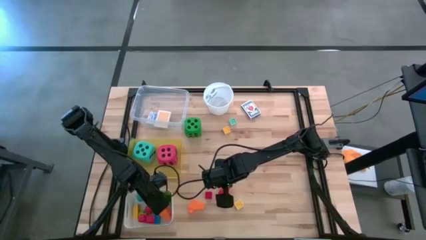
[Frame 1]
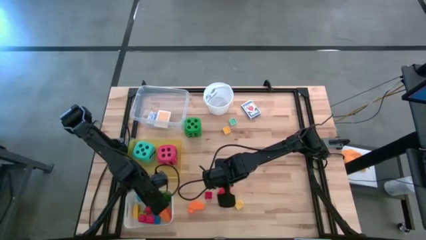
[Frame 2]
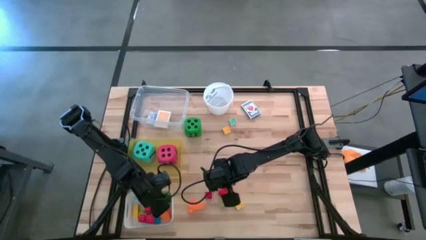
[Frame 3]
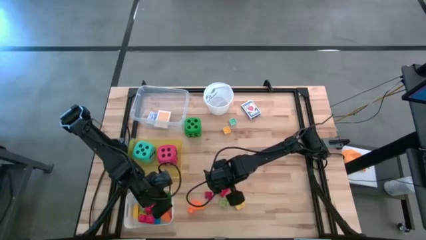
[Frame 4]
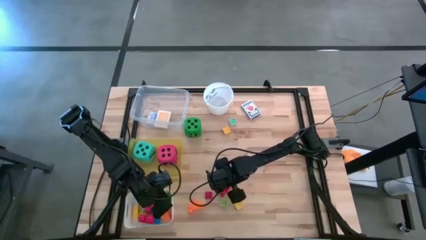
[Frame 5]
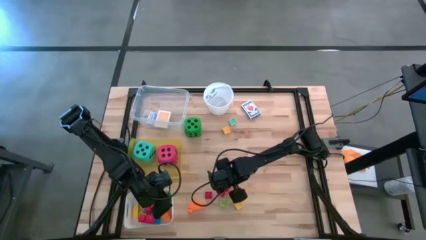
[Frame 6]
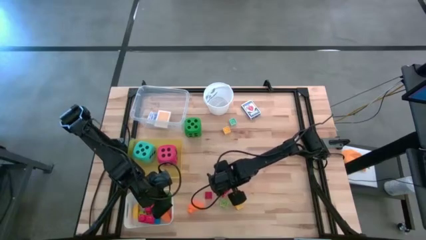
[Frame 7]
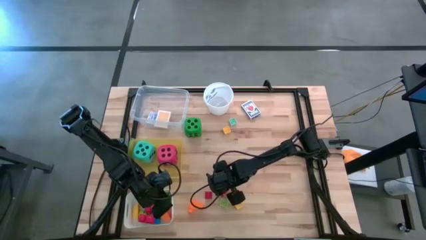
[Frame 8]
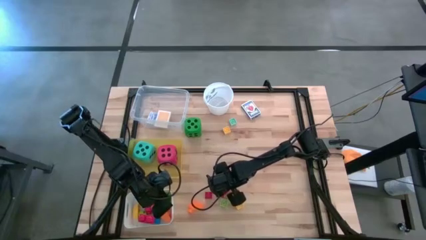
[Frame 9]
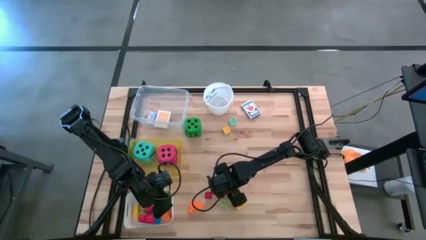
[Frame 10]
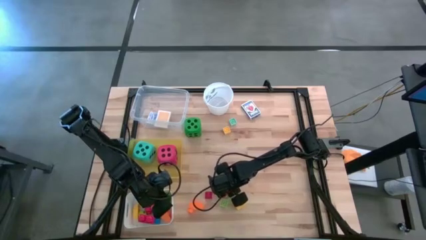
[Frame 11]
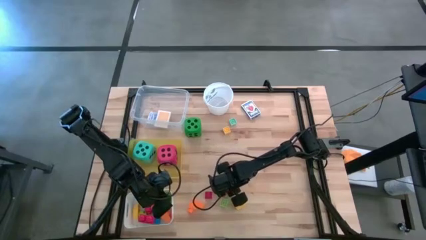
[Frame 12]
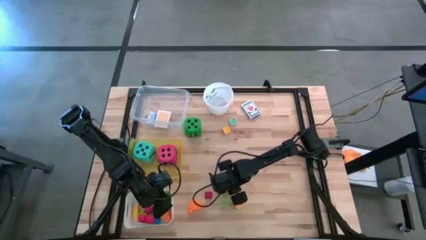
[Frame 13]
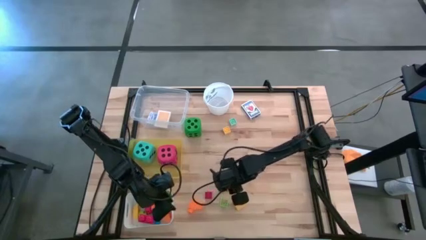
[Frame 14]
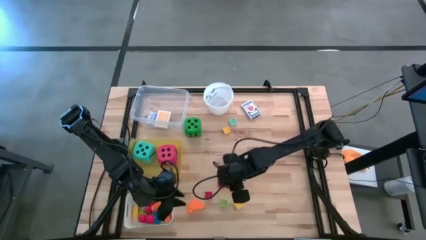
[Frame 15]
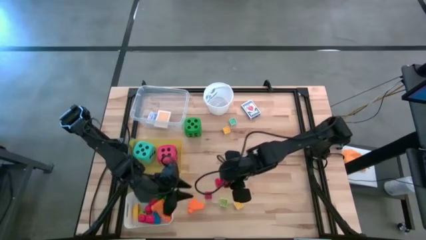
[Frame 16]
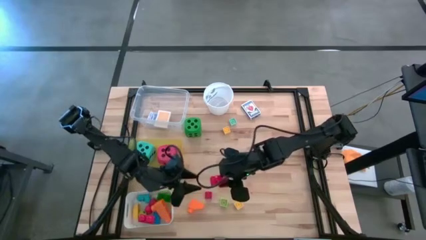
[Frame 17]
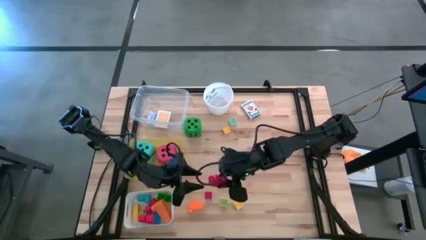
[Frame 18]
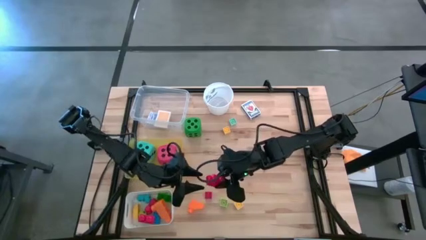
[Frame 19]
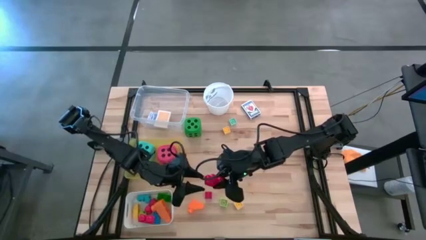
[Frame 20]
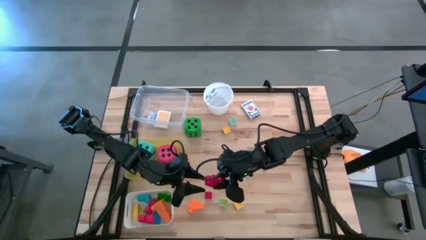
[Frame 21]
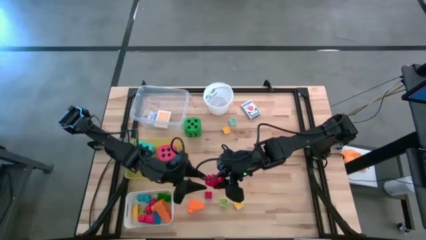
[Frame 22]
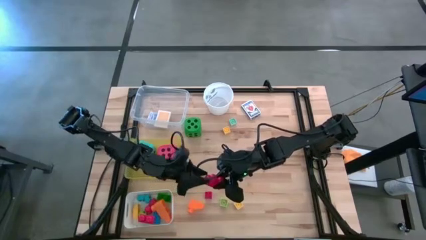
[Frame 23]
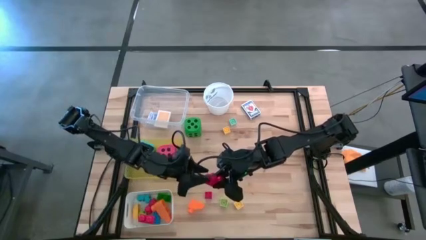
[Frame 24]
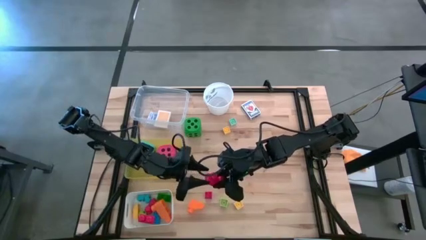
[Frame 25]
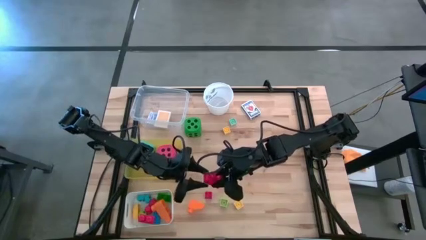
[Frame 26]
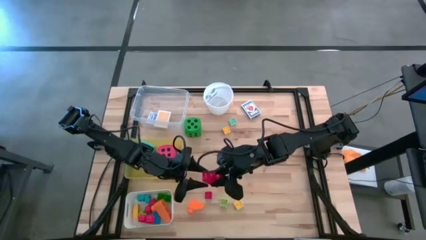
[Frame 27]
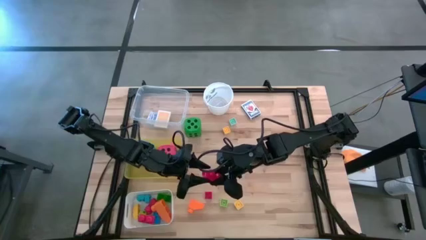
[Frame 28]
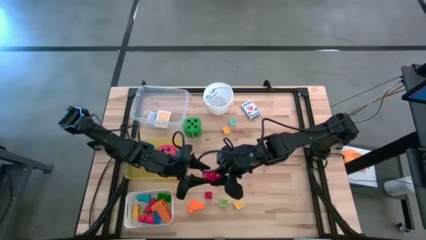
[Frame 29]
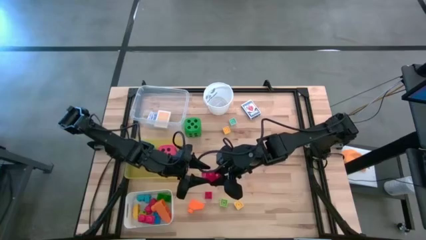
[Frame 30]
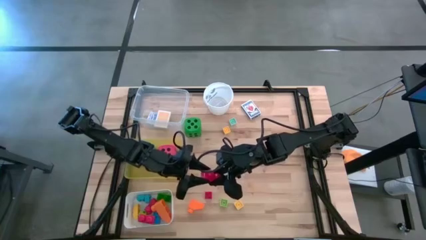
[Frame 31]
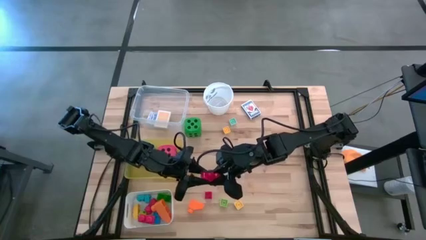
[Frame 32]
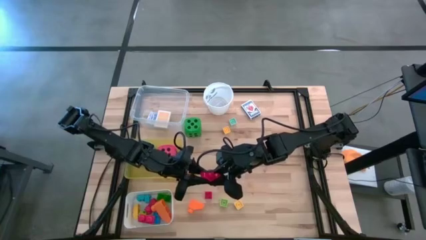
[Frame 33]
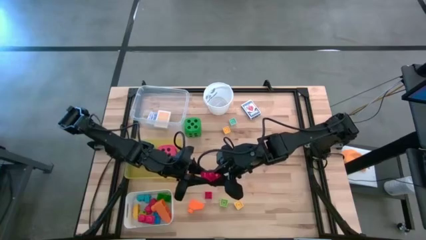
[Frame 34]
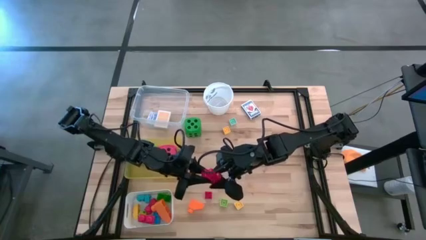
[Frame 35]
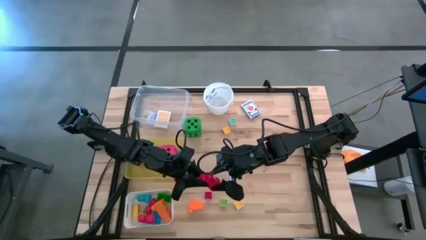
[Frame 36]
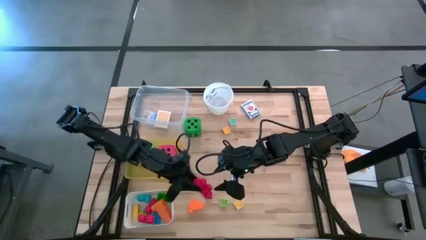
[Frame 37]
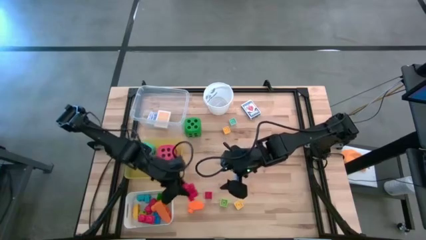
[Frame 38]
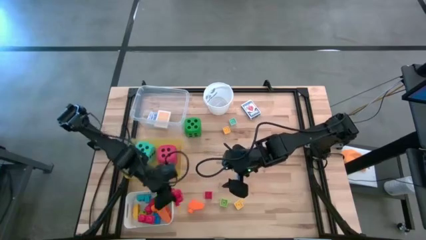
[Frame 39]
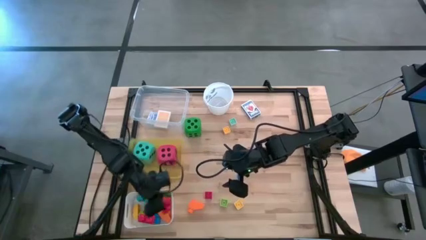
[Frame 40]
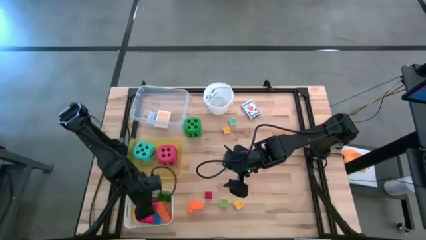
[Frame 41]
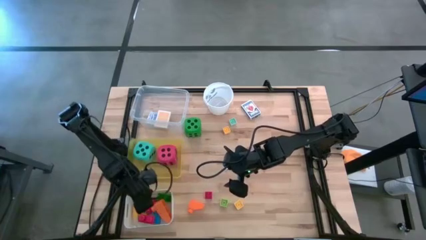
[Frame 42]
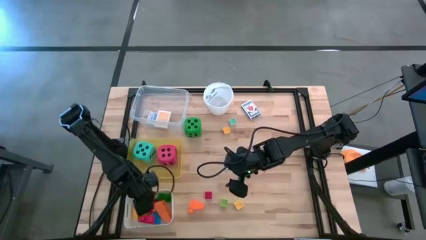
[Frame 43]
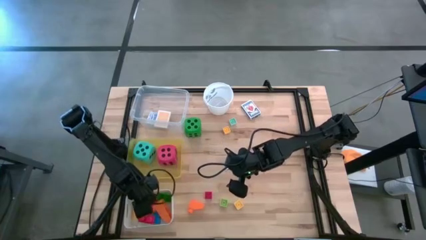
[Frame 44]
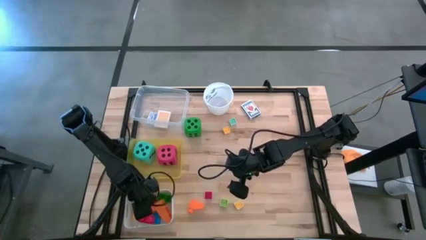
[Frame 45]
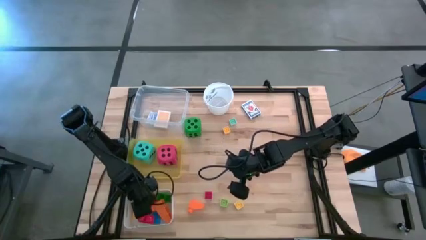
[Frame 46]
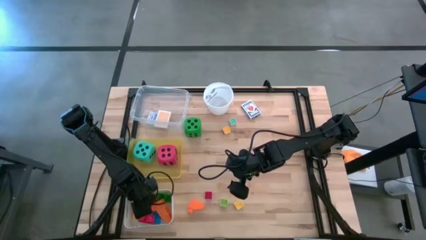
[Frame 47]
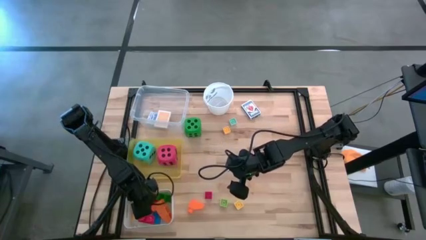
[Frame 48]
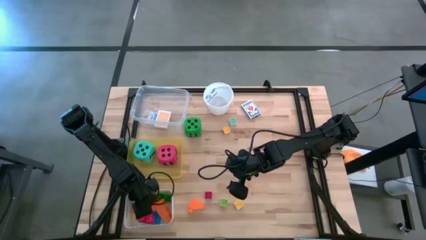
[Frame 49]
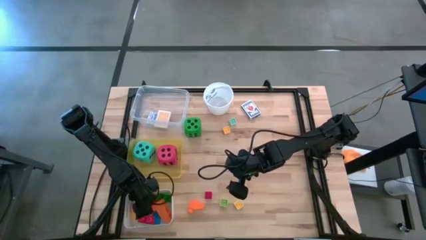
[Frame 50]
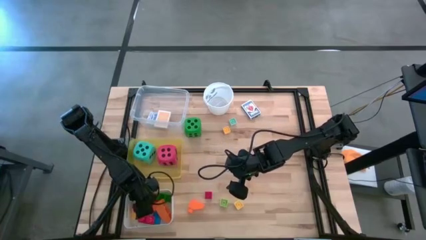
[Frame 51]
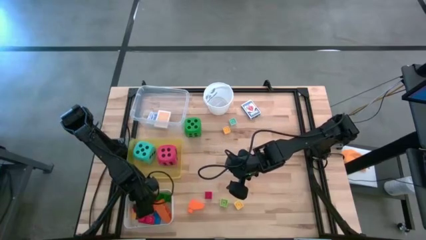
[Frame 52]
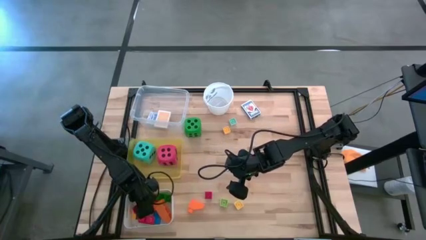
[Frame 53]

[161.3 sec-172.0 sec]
Task: Pick & Place Toys
Put the right red game piece into the white bin

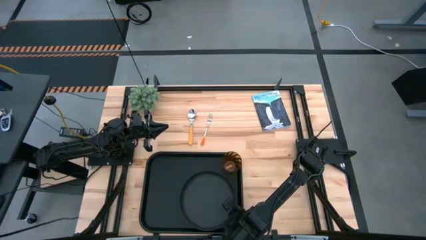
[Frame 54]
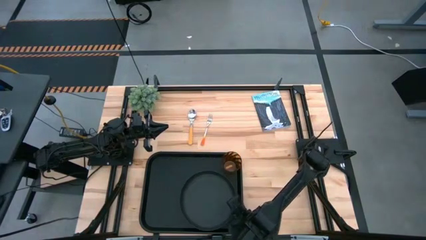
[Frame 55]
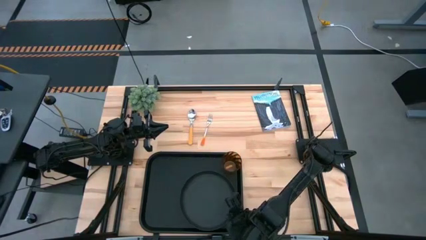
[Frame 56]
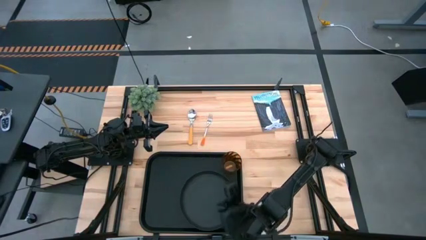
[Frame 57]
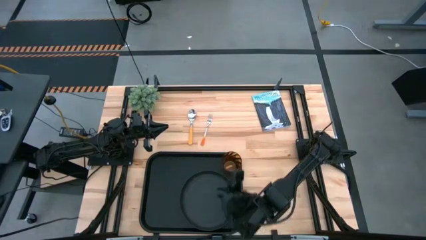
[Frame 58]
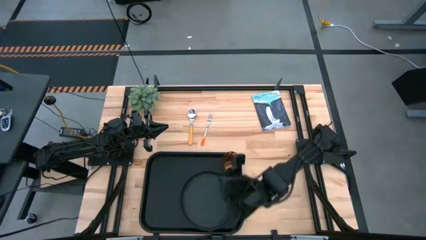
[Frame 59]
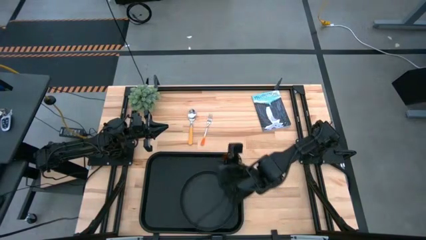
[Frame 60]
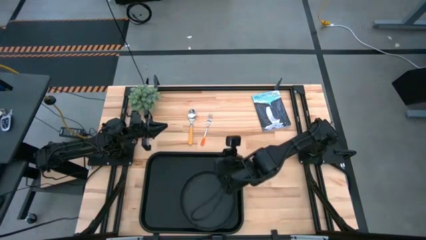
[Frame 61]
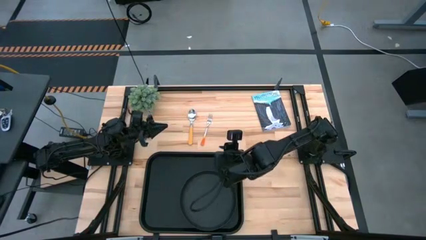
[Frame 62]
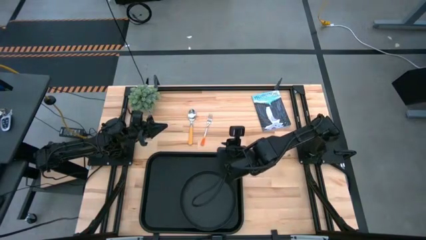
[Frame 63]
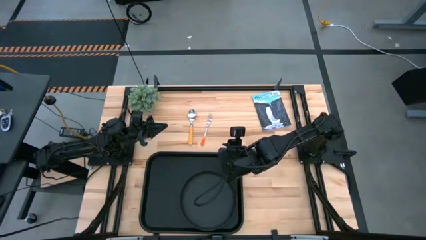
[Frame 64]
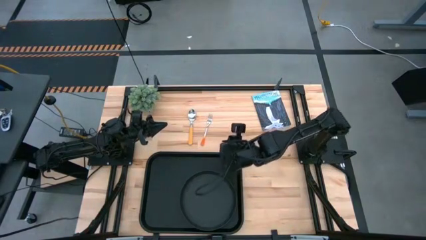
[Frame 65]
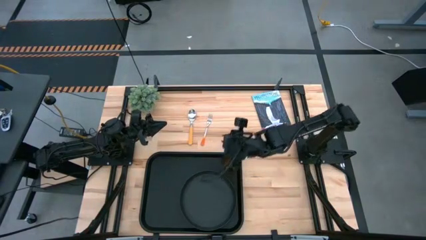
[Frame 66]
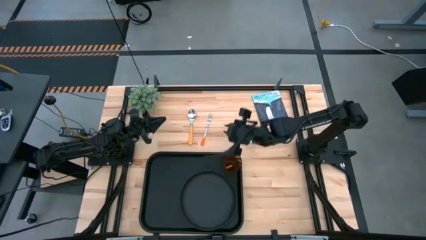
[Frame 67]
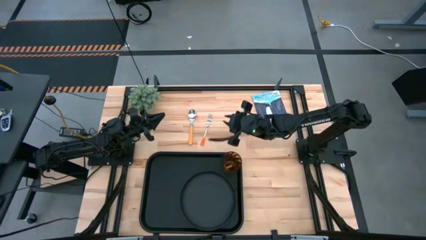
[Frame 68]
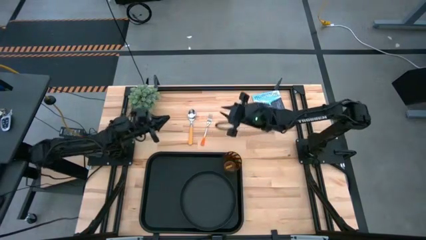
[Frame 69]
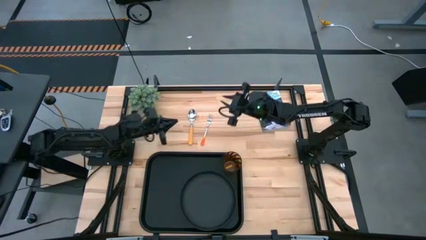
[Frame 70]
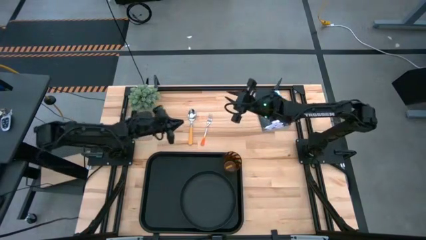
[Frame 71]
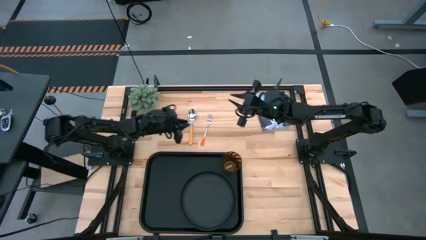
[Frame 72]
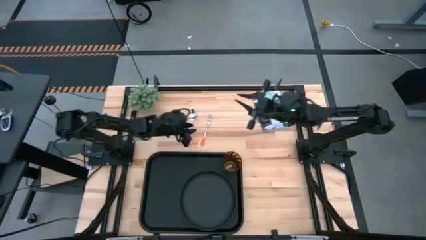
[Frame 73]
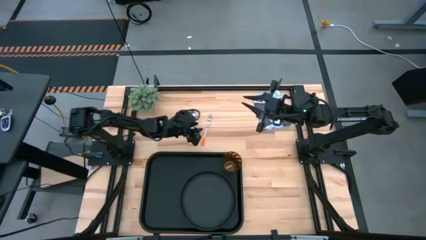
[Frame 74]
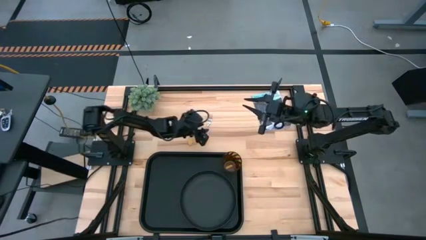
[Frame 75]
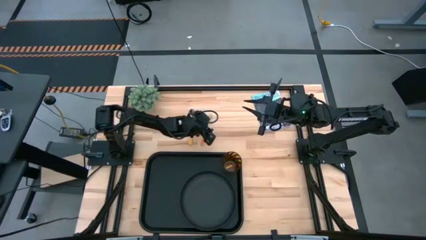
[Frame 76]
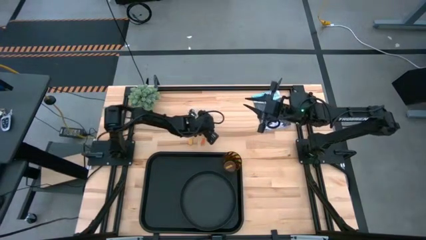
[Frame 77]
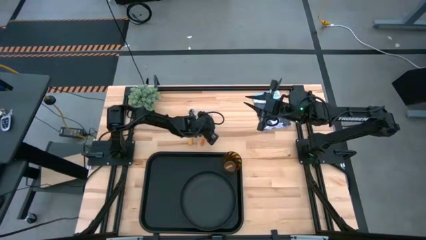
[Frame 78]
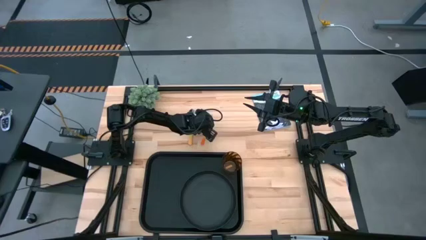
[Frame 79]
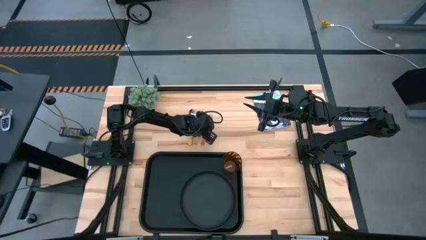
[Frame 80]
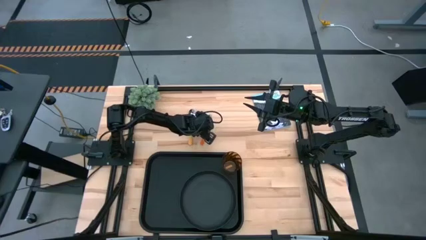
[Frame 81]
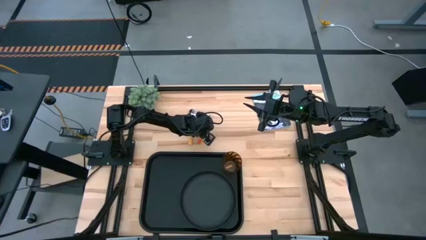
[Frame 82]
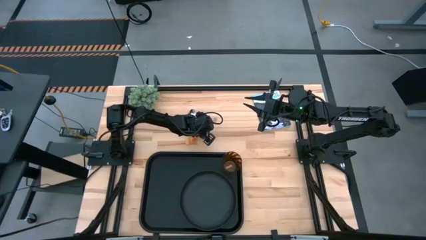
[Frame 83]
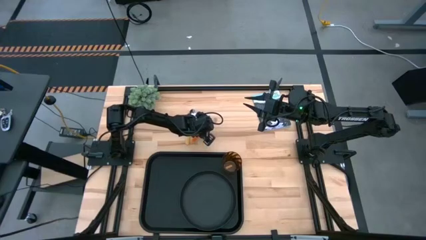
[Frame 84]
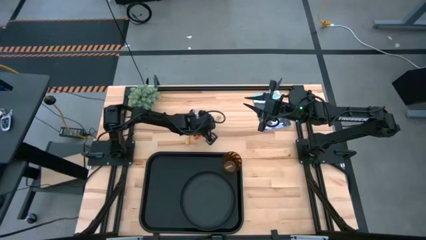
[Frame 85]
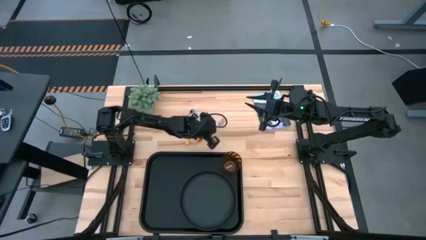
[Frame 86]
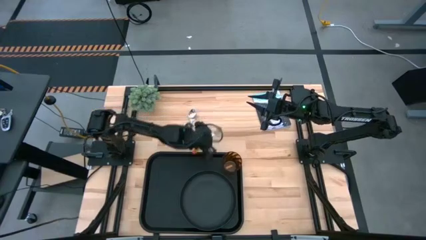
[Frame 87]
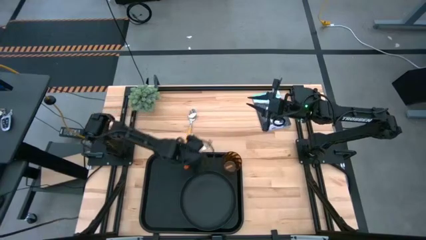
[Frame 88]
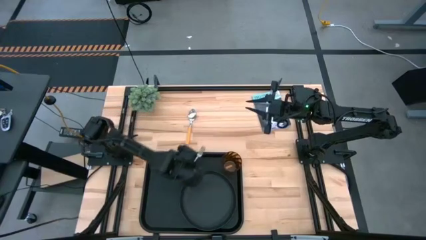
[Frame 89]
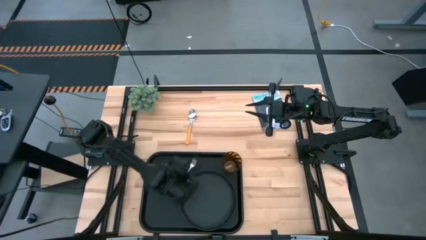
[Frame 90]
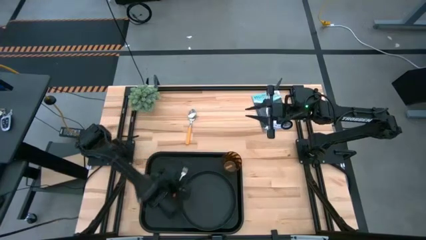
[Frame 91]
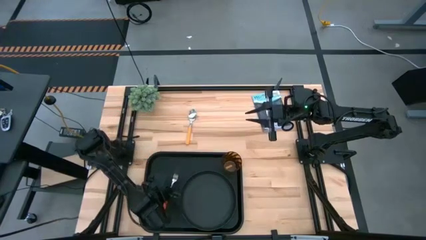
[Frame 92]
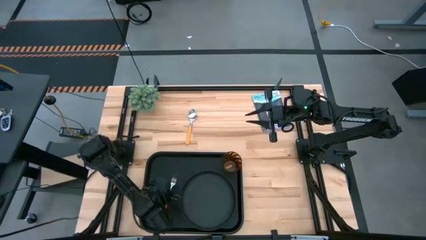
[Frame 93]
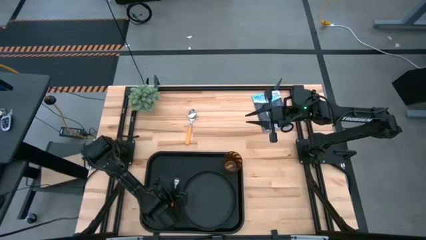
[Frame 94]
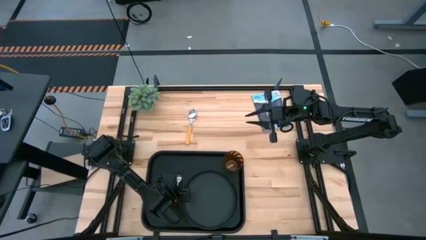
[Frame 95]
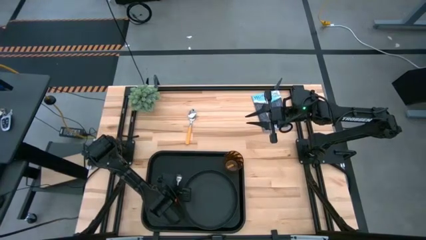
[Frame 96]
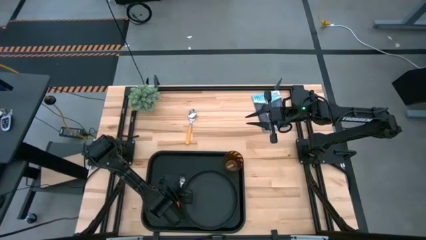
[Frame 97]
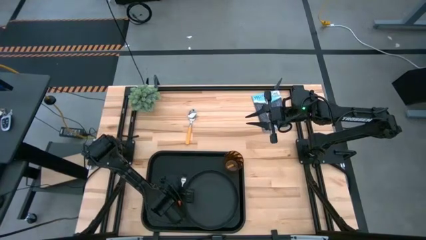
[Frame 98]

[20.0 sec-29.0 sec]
Task: Pick and place plate/cup/fork/spoon on tray
Put the orange fork on the black serving tray to the left of the black plate
